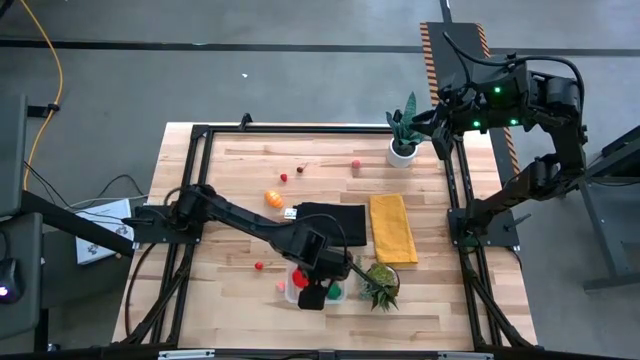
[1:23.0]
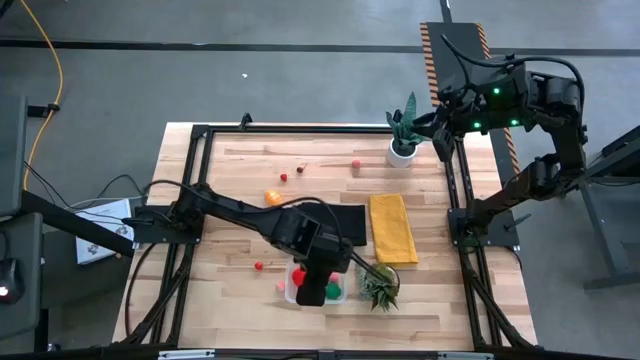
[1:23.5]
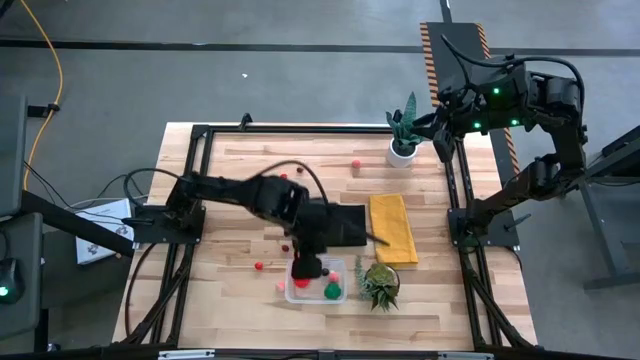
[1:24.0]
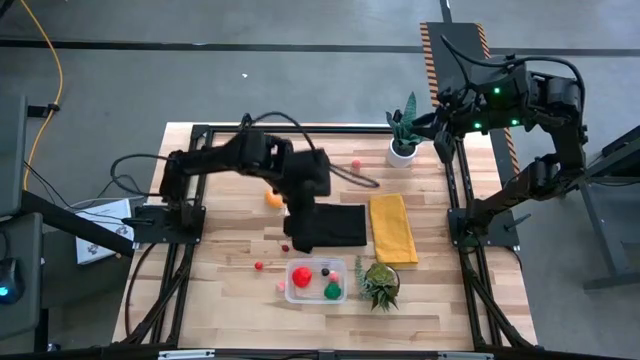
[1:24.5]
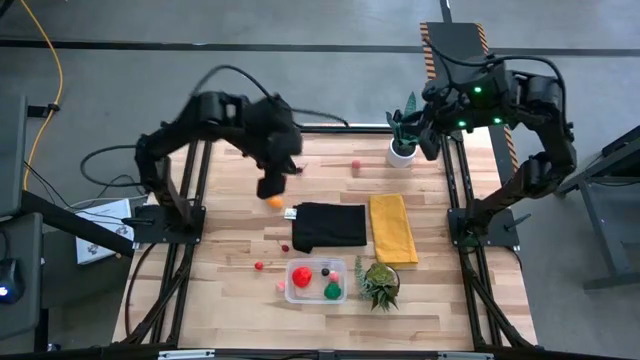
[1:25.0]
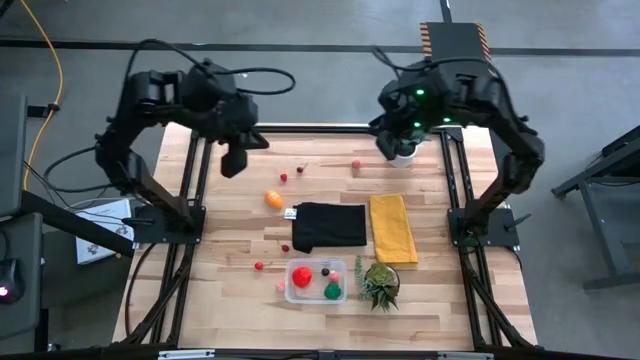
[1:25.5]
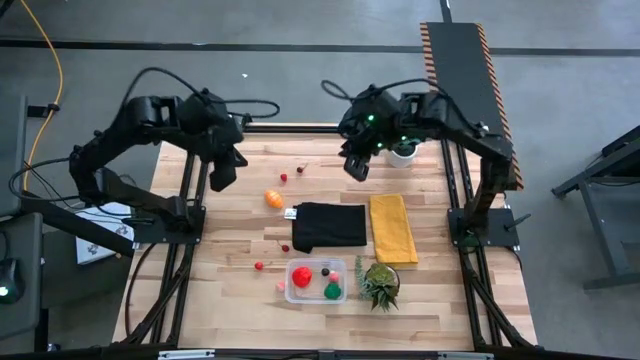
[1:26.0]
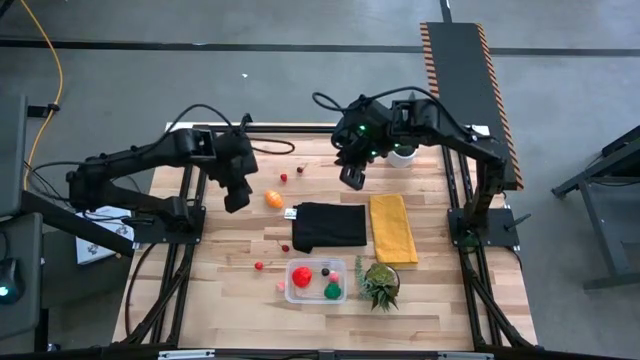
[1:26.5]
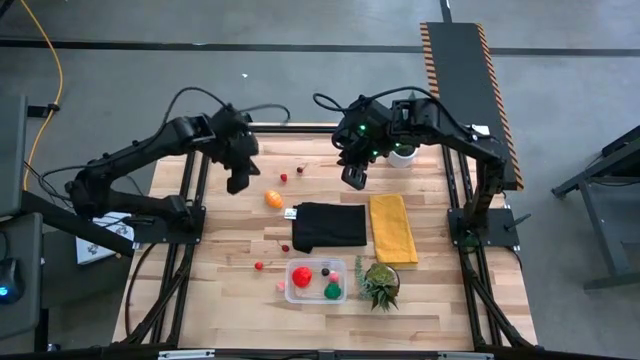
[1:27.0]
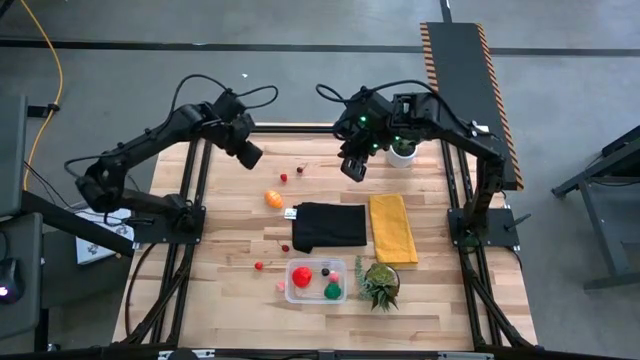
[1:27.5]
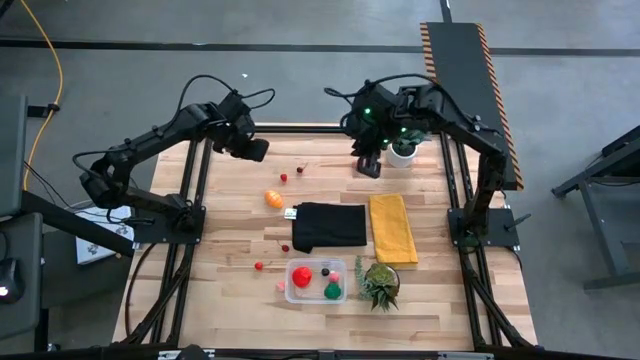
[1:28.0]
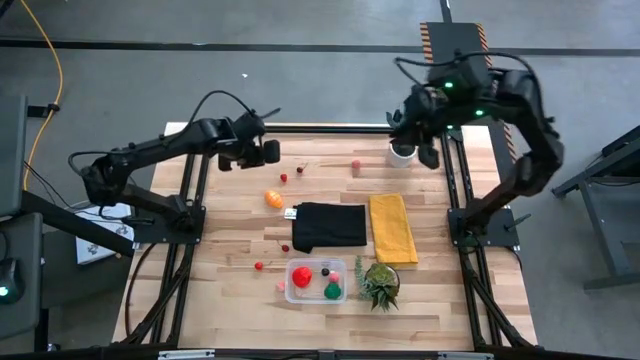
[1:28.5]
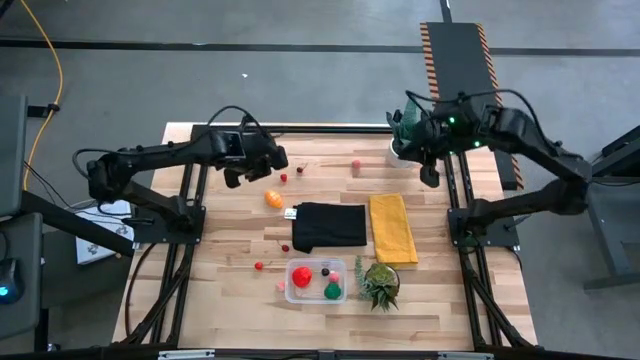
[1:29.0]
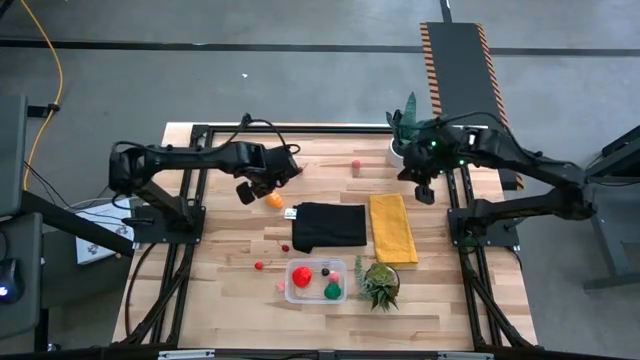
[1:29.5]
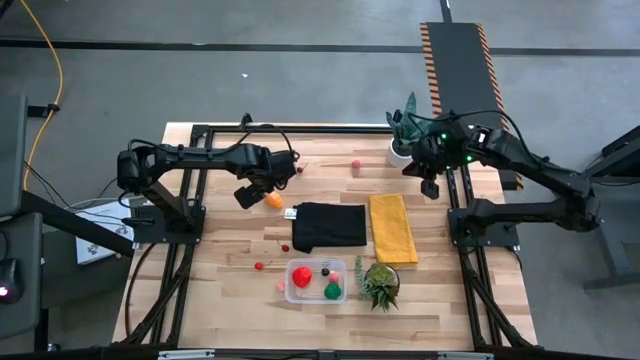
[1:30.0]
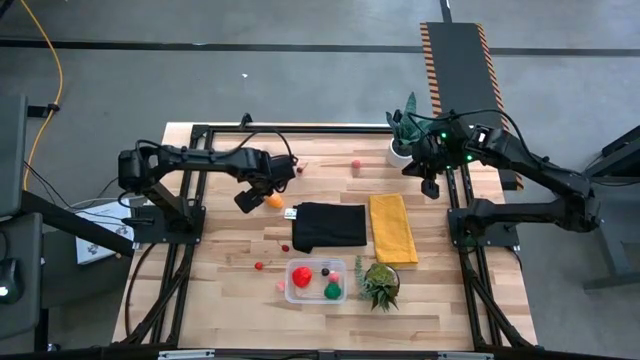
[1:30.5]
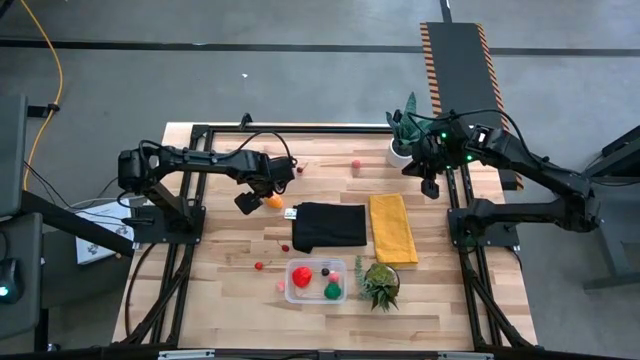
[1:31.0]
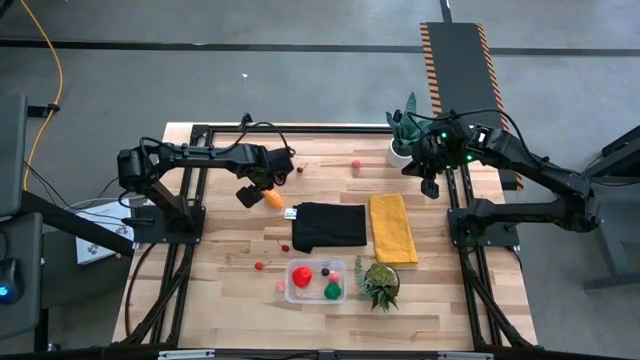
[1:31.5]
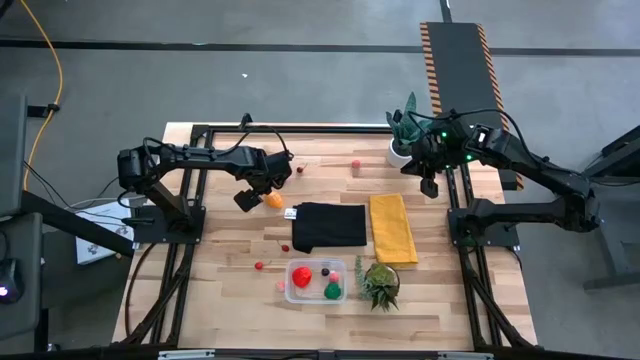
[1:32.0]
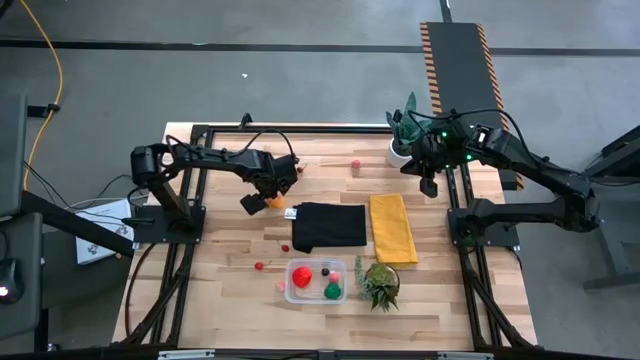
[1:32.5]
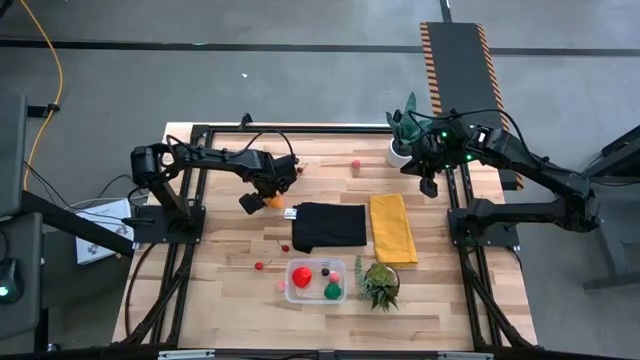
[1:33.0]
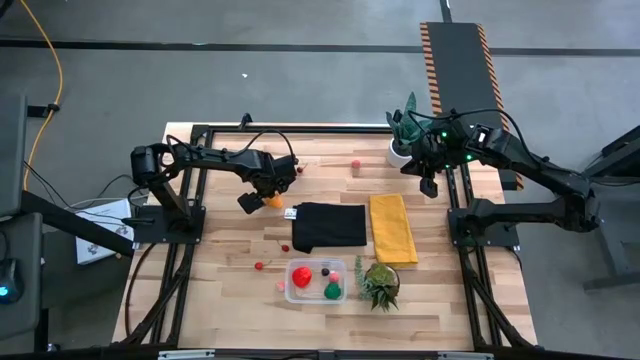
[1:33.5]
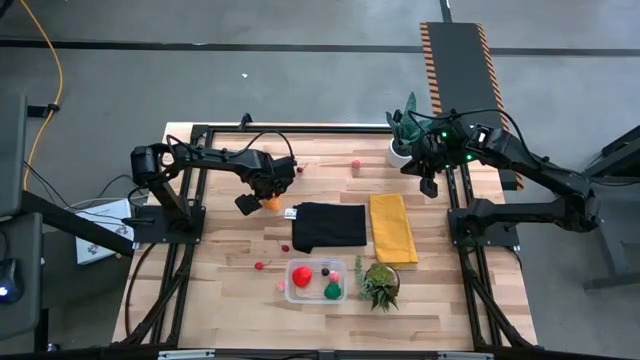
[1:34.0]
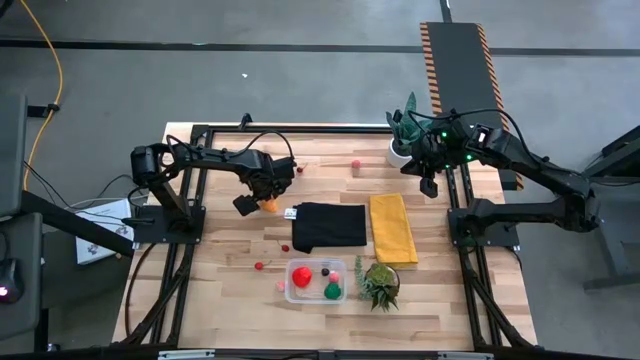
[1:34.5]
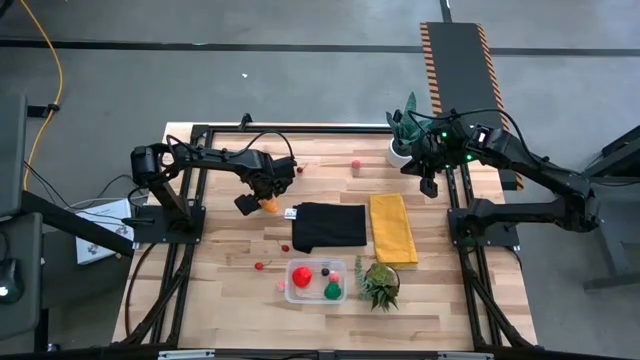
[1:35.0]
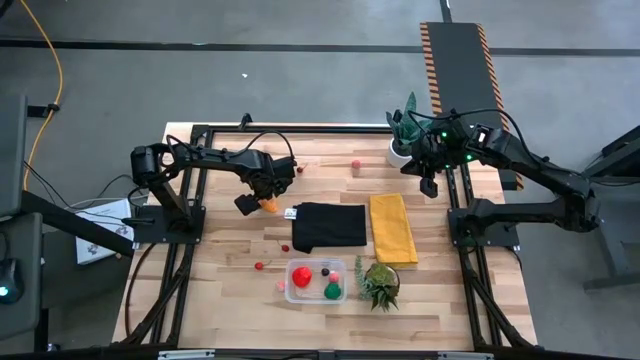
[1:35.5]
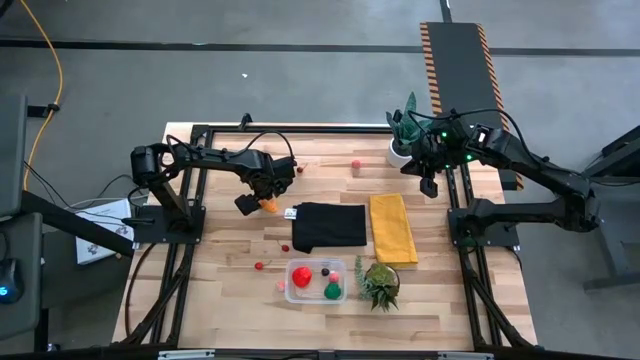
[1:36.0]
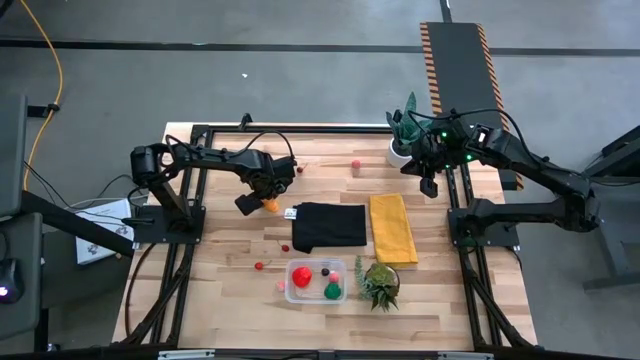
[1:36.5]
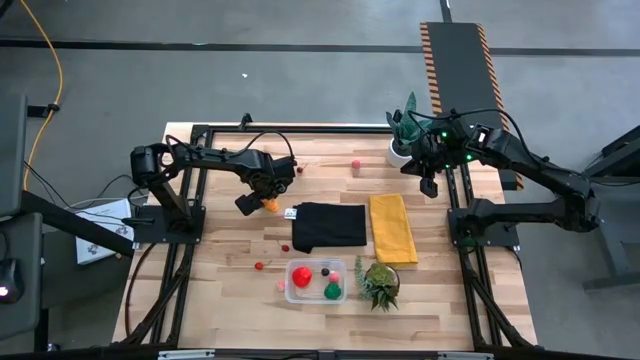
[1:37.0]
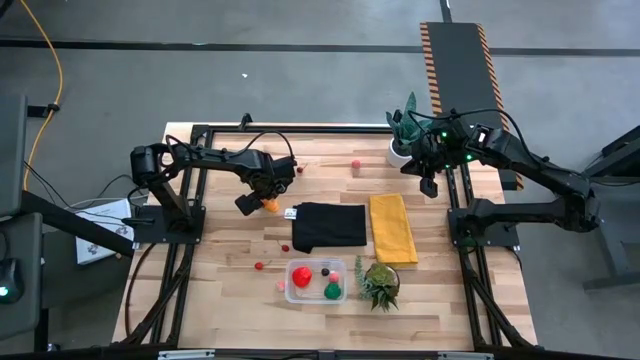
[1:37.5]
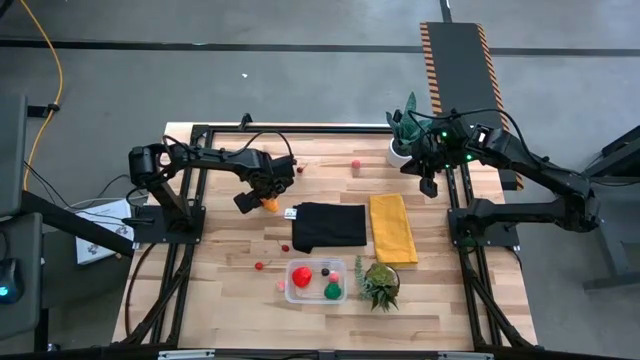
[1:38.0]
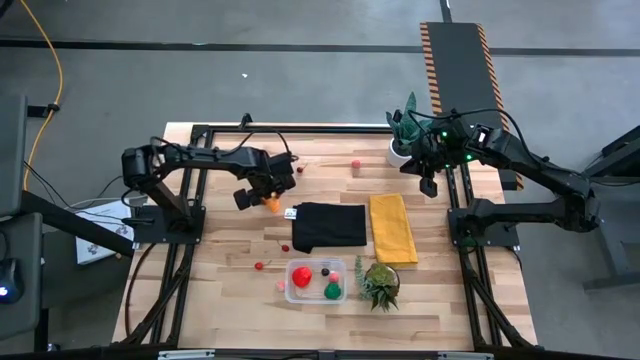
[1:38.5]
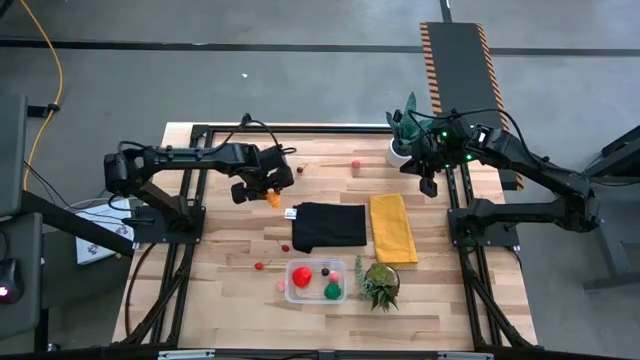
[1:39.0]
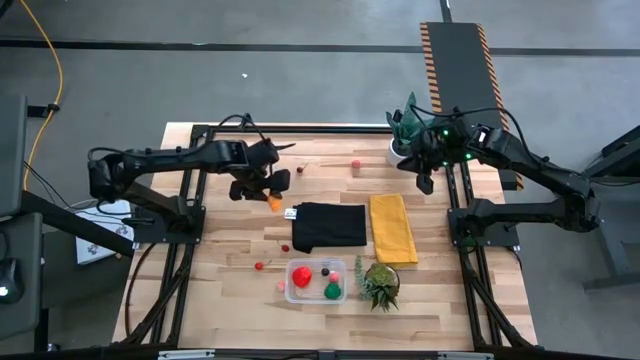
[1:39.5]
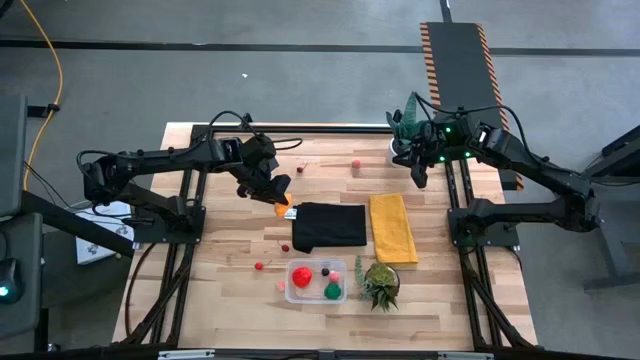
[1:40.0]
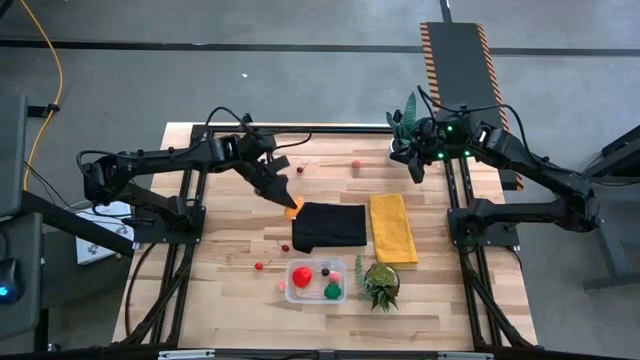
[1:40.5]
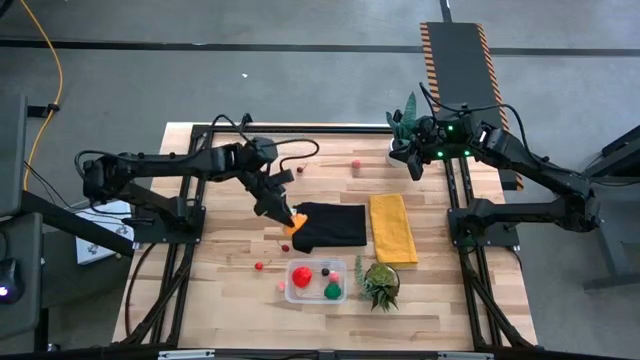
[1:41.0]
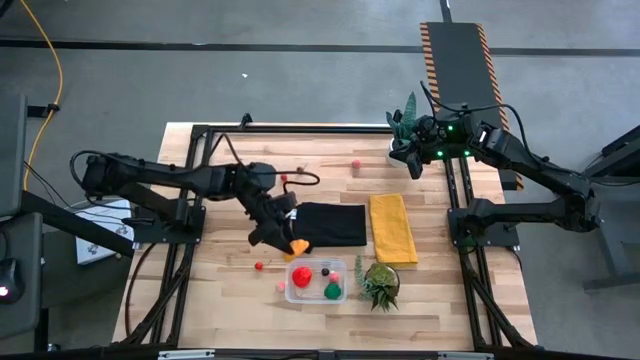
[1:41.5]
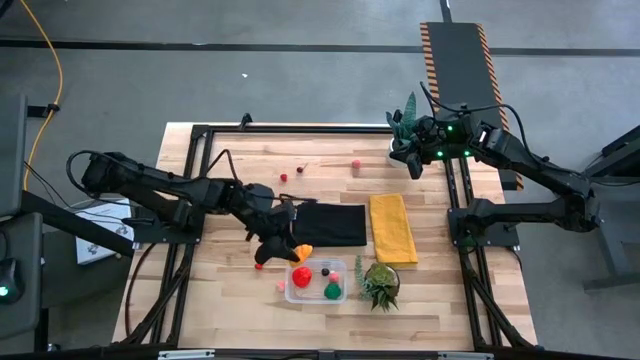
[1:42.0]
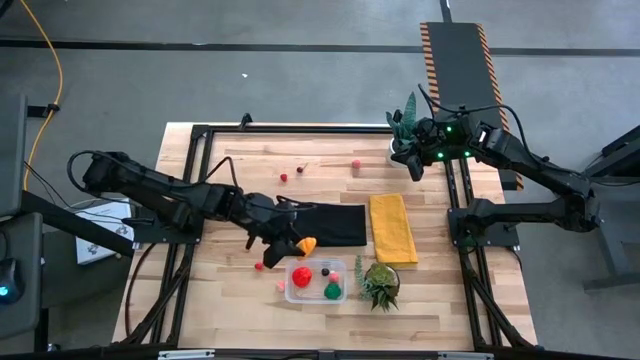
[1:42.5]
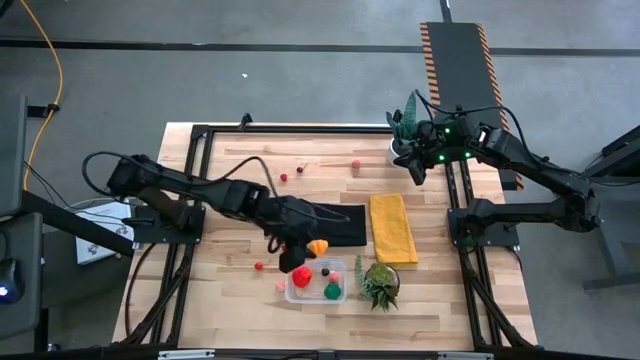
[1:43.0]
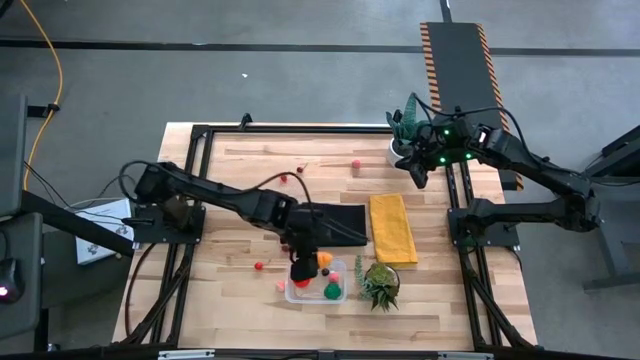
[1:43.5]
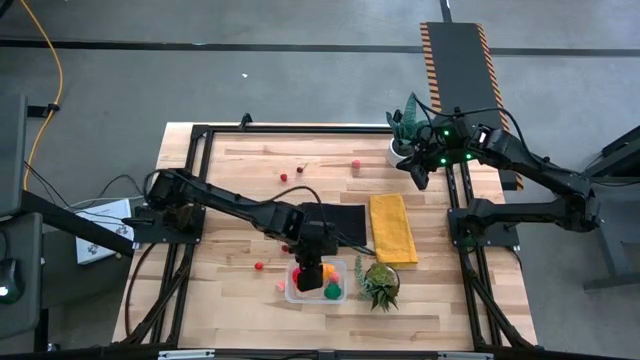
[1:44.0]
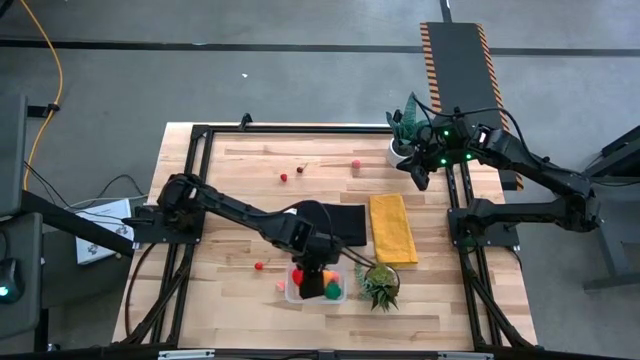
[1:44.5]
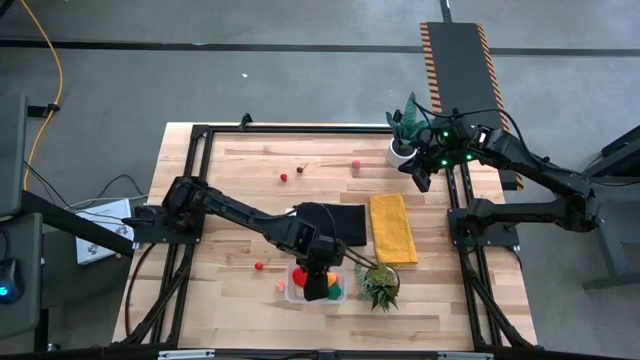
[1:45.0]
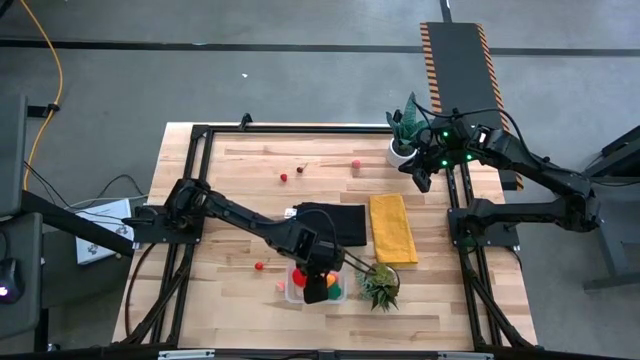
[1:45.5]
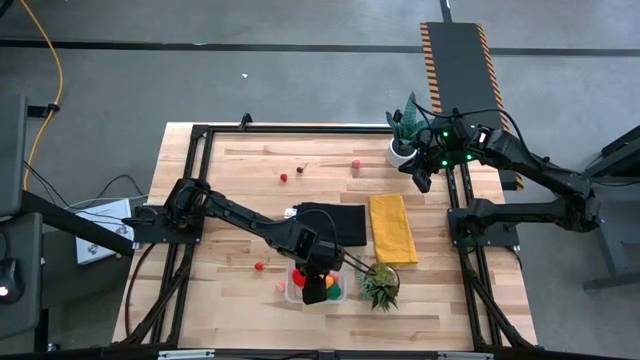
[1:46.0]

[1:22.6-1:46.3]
Task: Pick and placing Produce into tupperware
Put the croissant into the transparent bin
